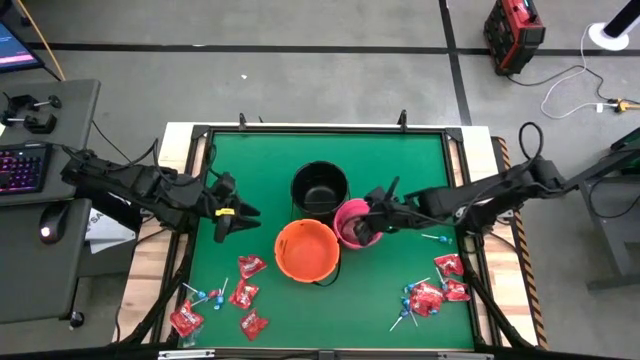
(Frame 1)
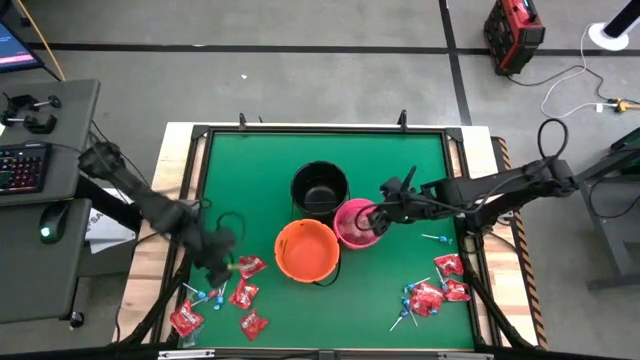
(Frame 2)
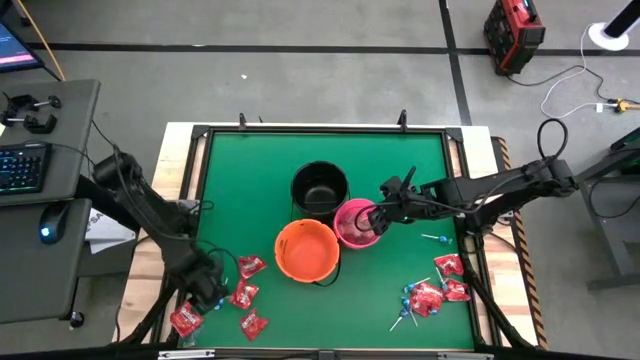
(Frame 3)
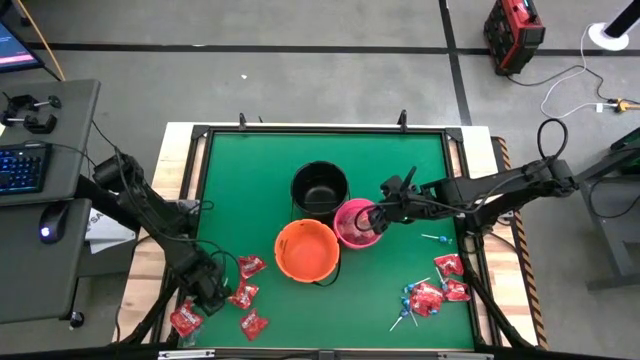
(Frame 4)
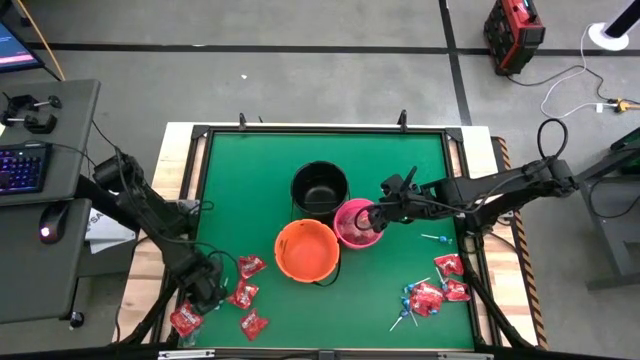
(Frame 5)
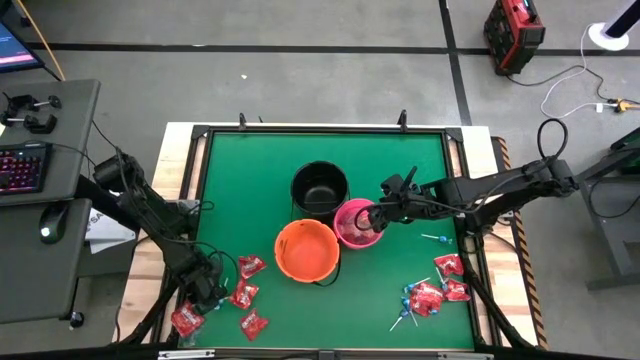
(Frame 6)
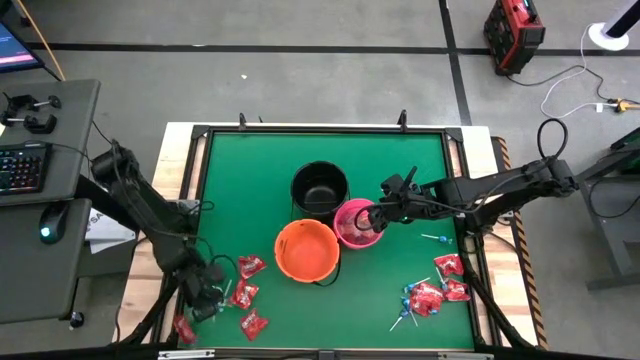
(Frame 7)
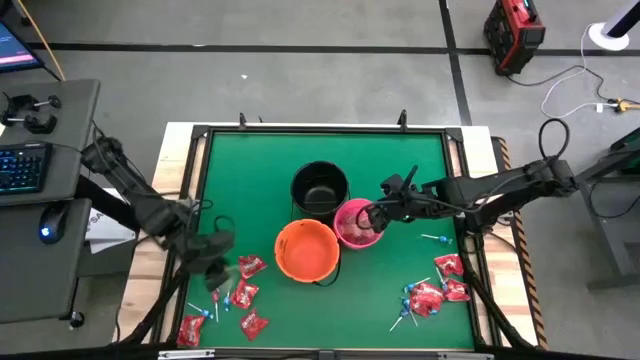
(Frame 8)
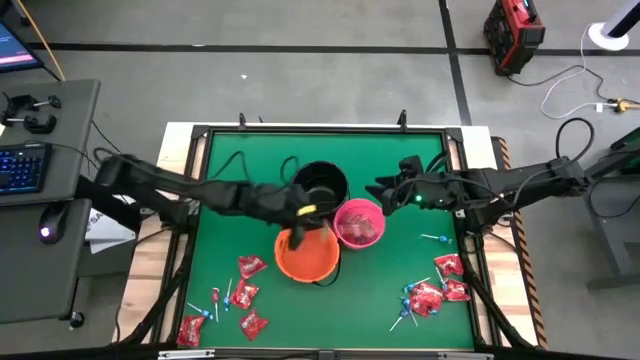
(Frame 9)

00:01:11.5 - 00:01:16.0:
Task: Sort candy by brand, put in halloween buckets
Put the green gummy into the pink bucket

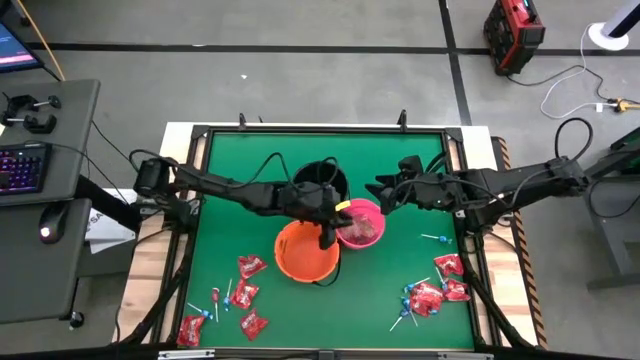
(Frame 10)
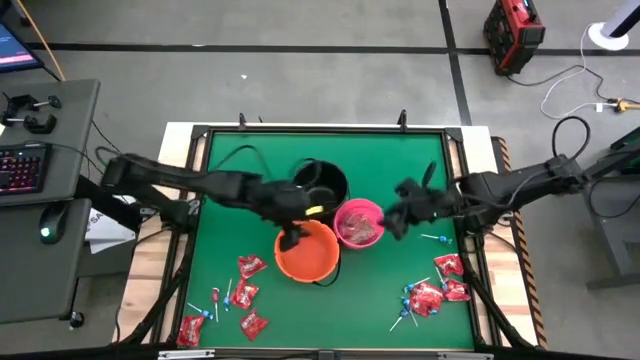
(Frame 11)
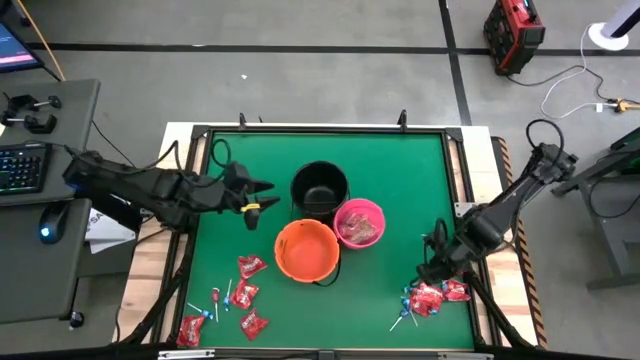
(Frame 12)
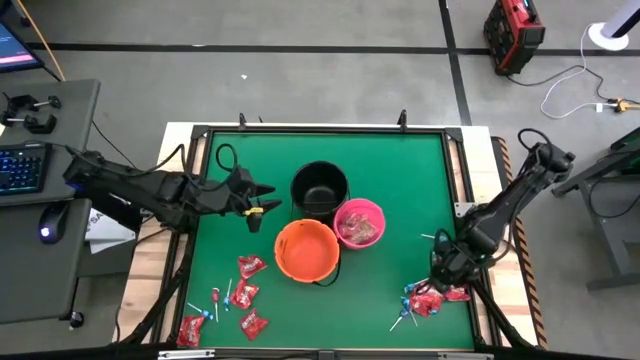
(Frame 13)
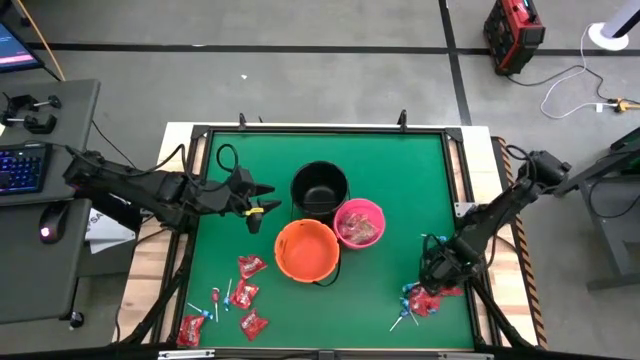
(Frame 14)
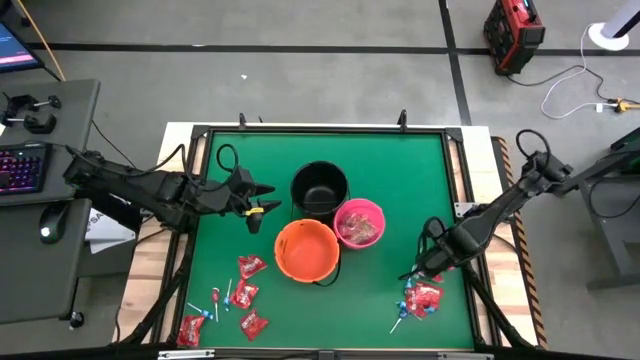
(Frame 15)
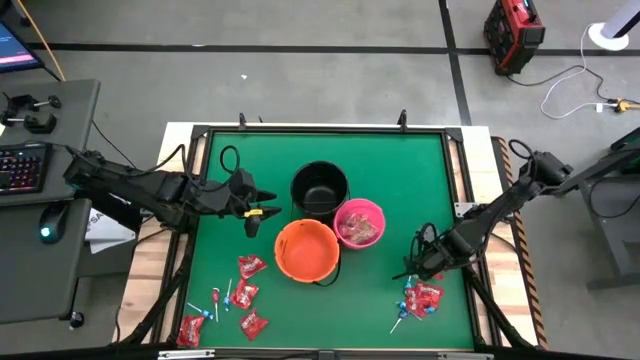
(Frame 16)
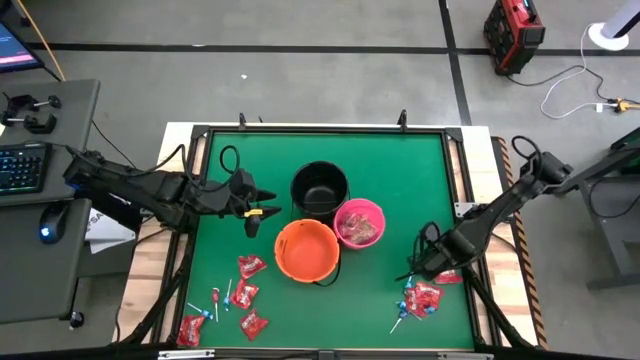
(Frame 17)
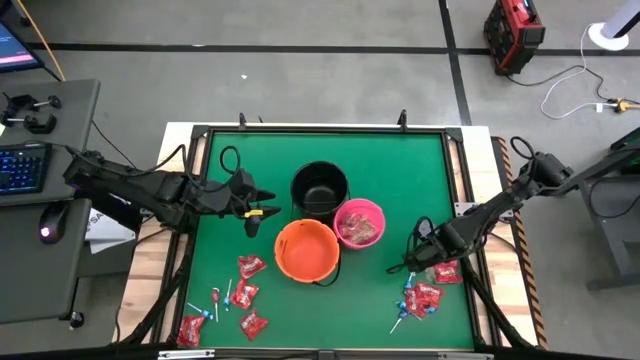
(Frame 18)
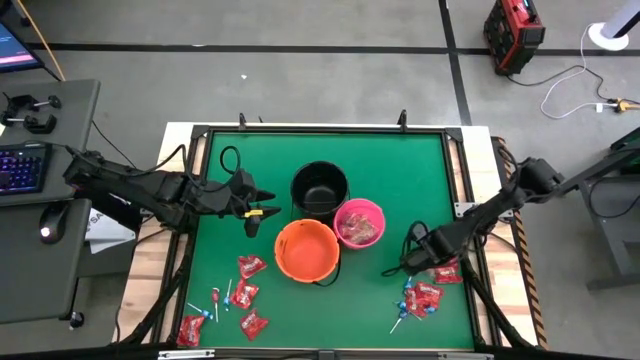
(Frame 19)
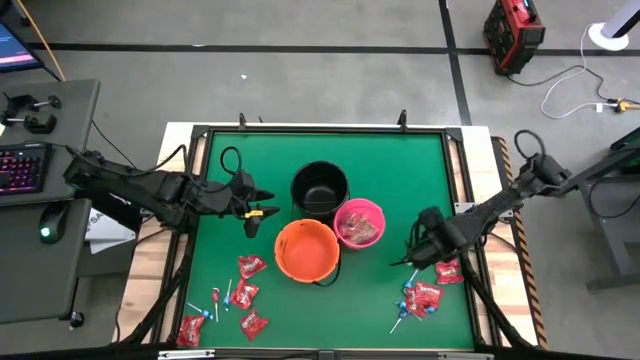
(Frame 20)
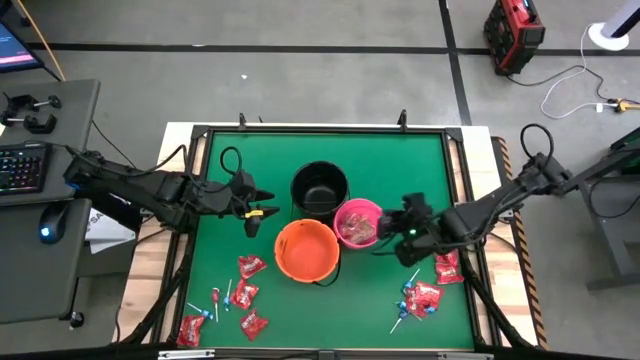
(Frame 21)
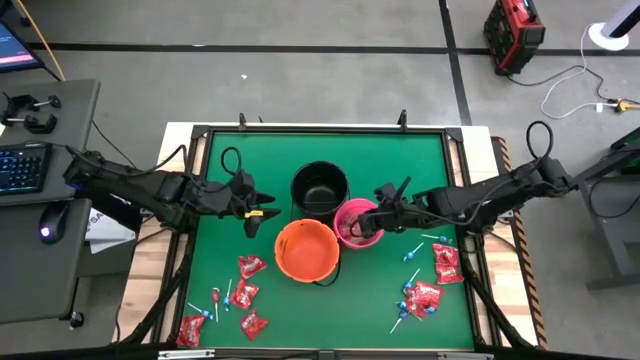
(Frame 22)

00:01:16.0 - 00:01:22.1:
Put the orange gummy into pink bucket

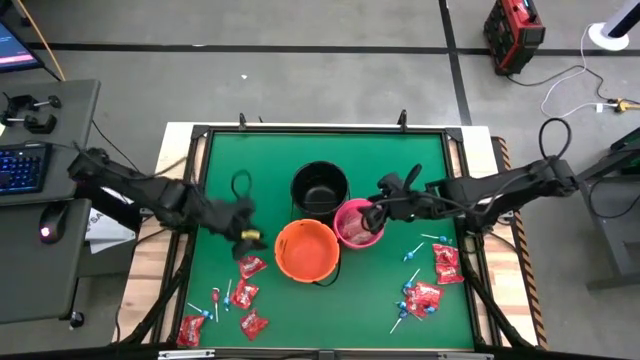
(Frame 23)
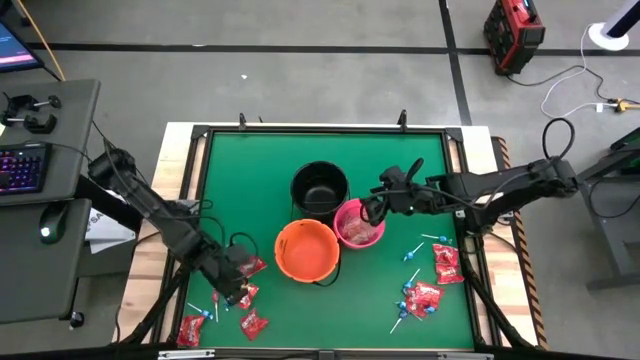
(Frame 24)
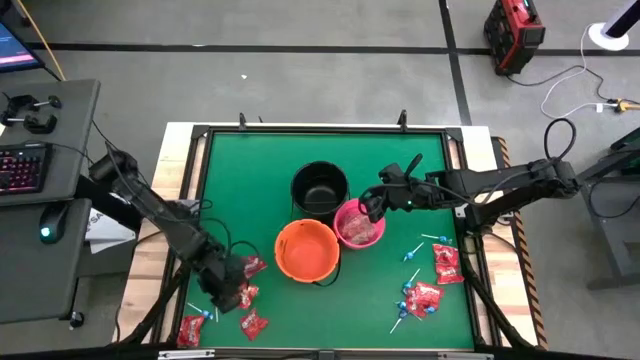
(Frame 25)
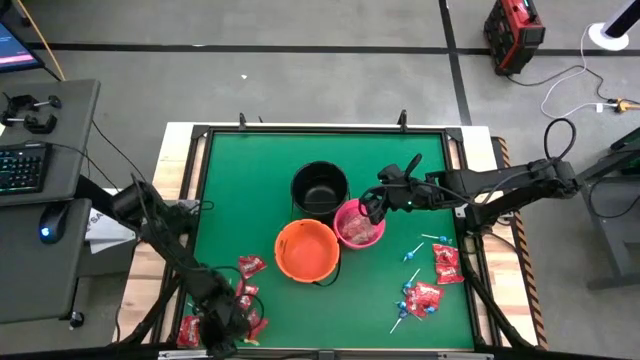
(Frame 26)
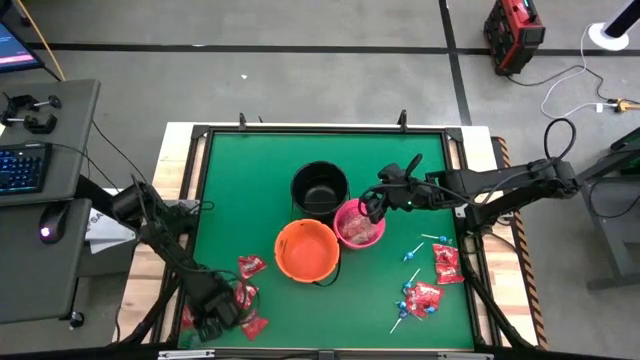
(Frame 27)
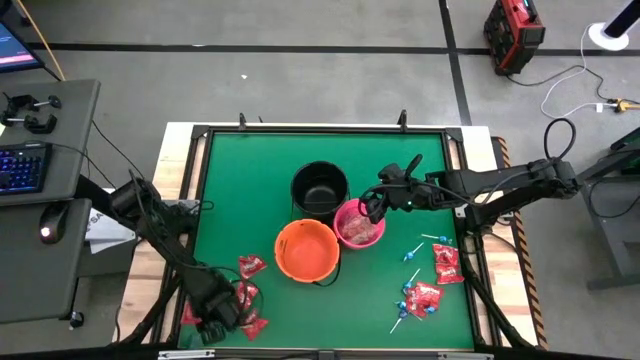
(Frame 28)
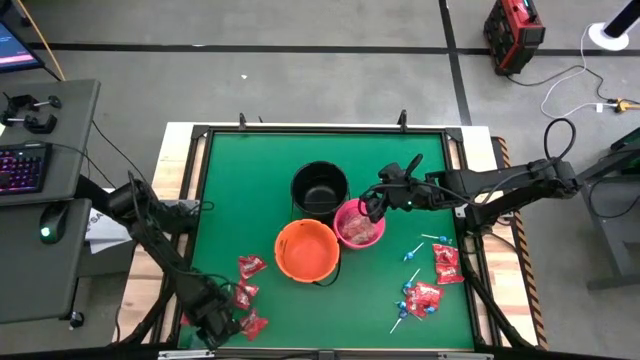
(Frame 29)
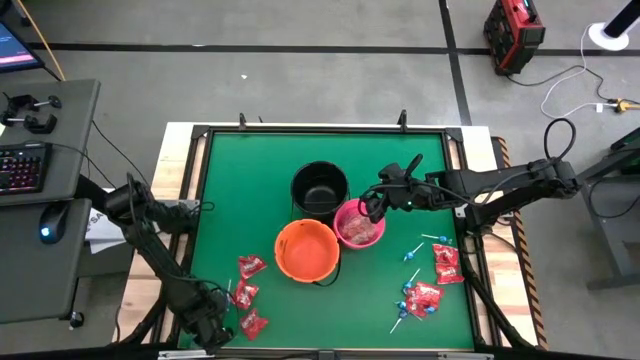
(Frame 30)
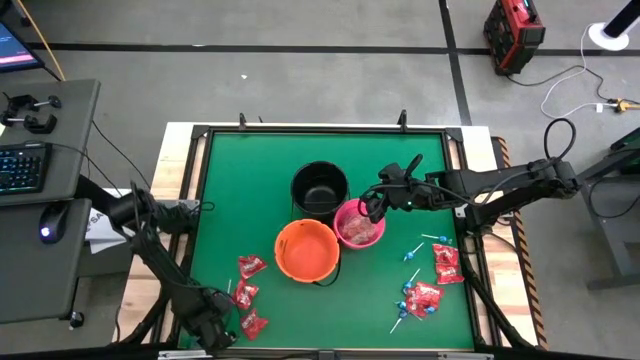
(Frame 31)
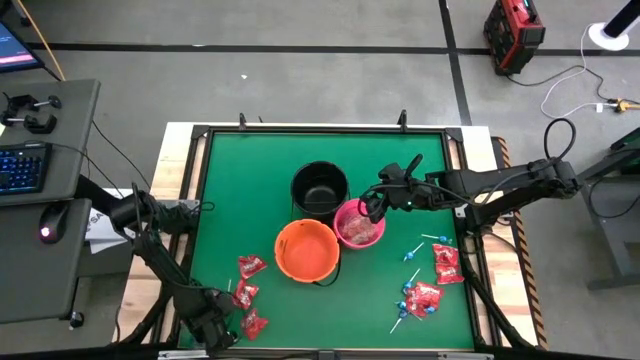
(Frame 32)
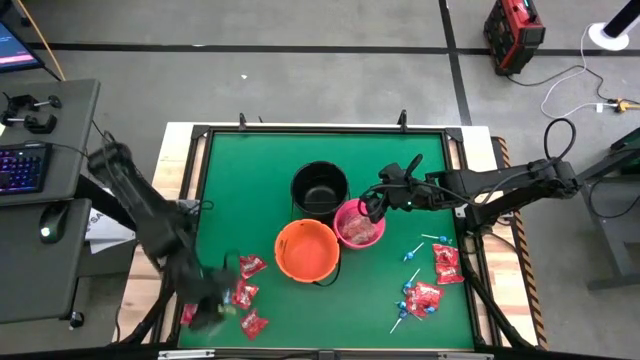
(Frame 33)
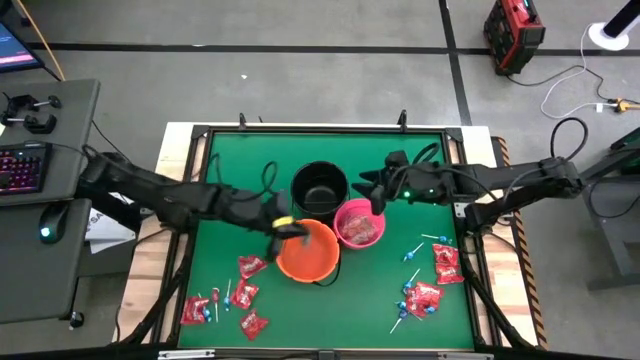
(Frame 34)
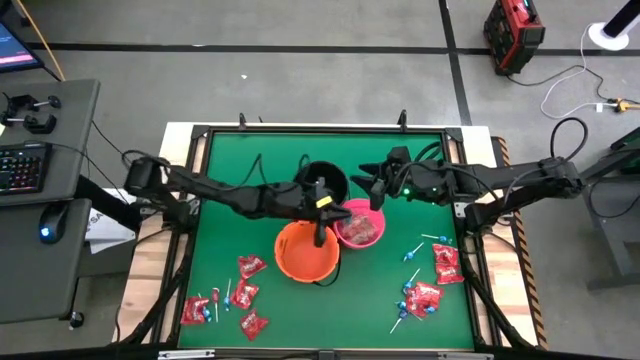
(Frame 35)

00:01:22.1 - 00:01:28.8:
Put the blue gummy into the pink bucket

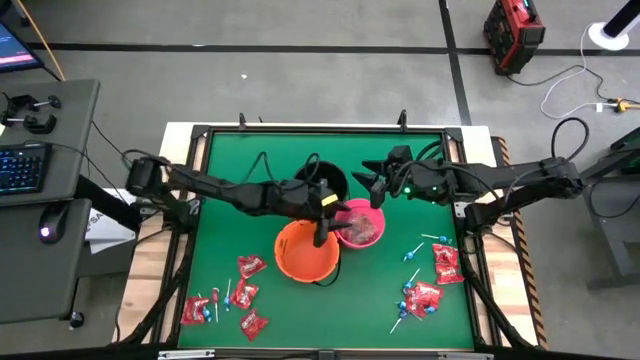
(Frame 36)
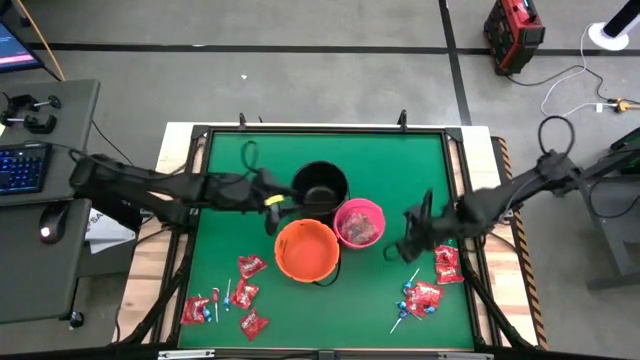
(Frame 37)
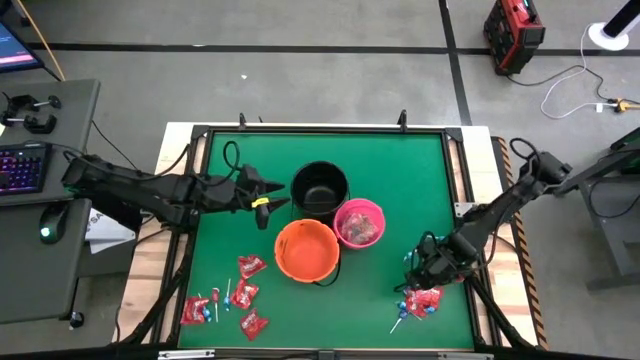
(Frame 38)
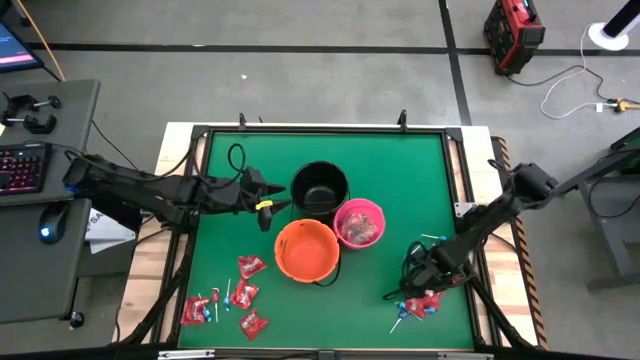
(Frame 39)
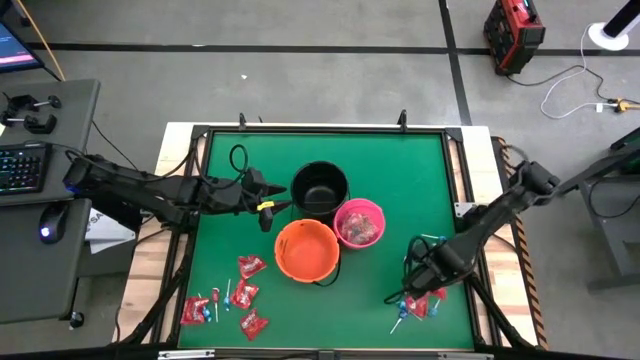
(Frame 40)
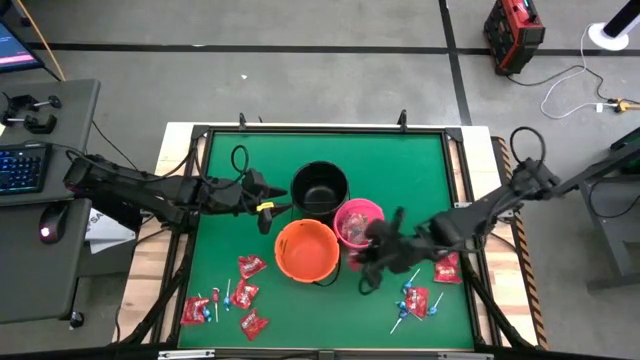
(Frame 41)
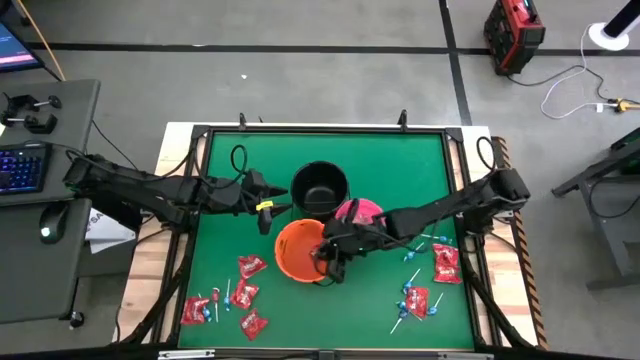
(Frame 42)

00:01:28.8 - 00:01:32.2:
Put the red candy into the orange bucket

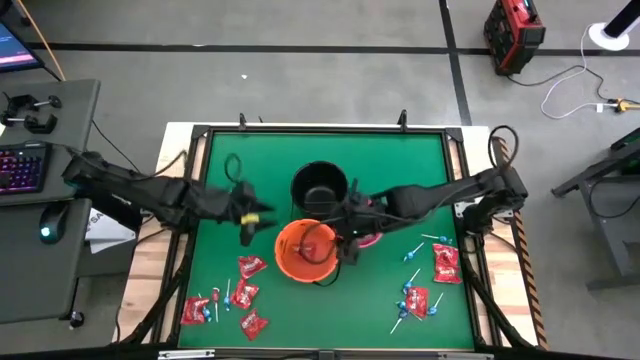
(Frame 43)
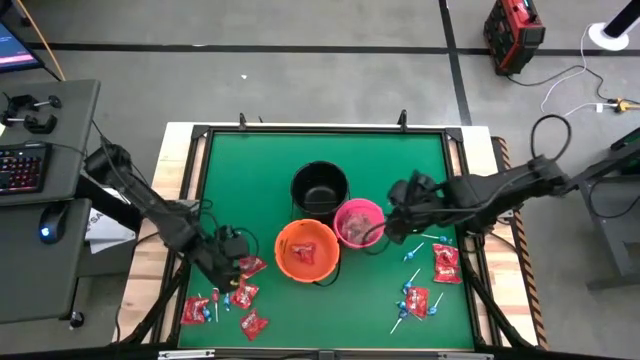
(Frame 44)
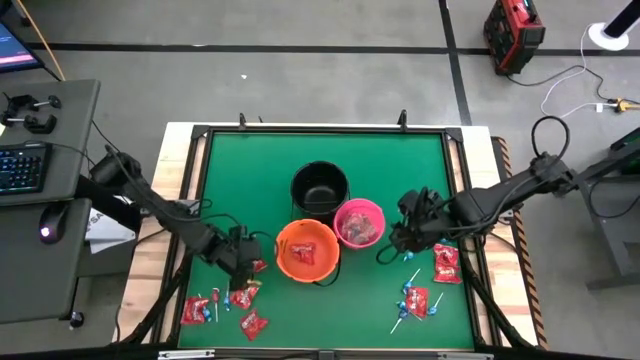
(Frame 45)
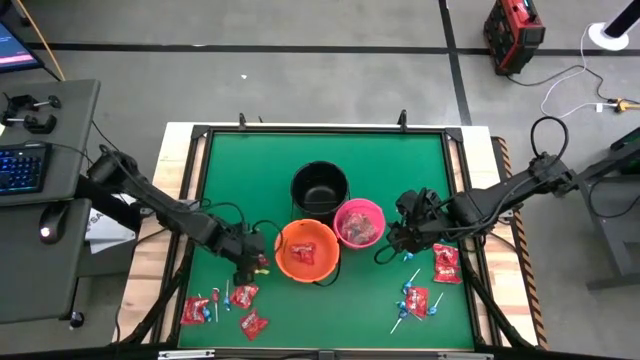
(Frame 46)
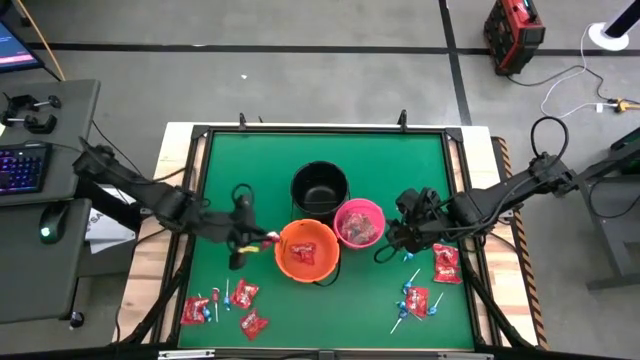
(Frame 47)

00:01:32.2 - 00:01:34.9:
Put the red candy into the orange bucket
